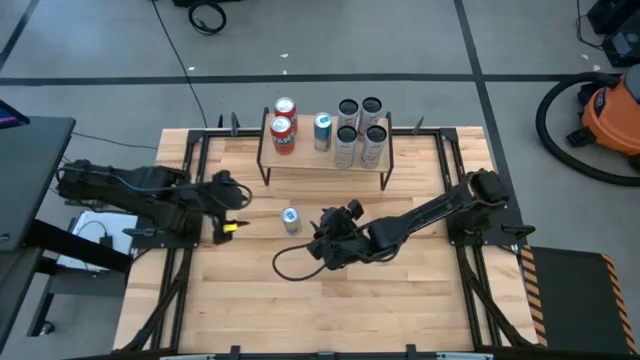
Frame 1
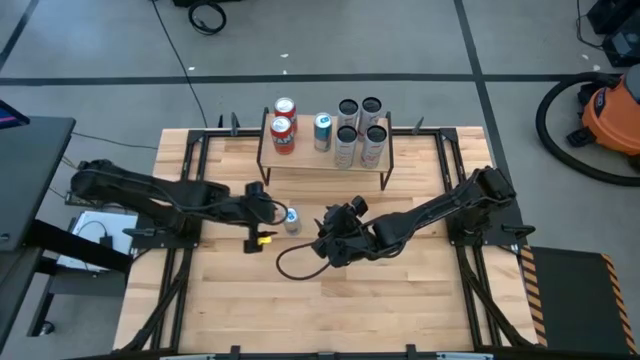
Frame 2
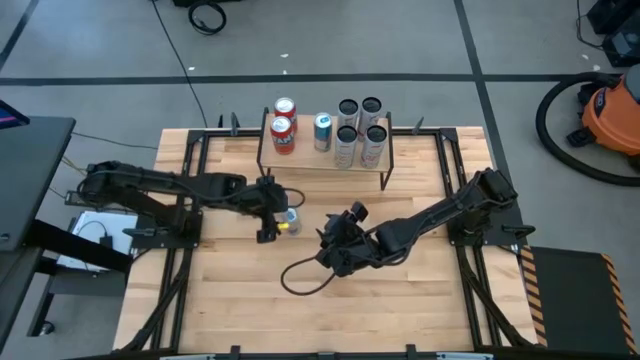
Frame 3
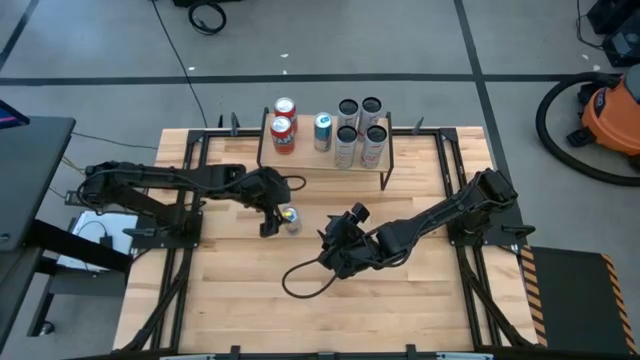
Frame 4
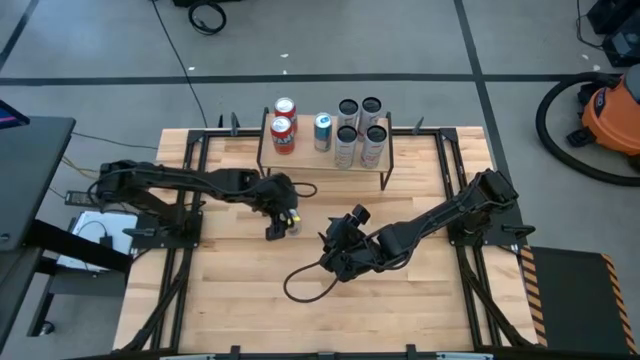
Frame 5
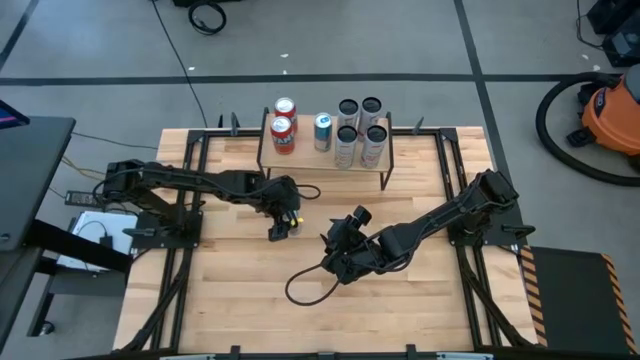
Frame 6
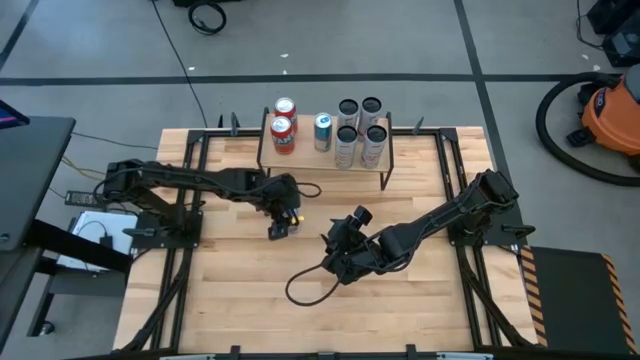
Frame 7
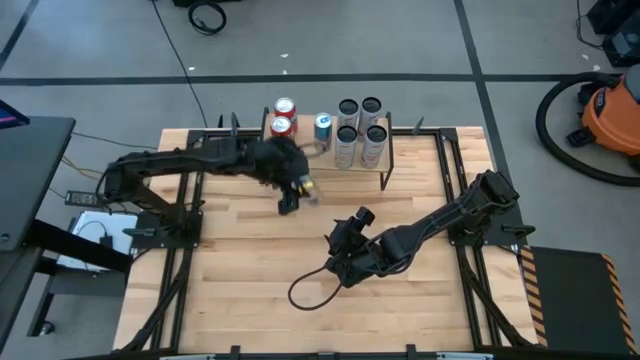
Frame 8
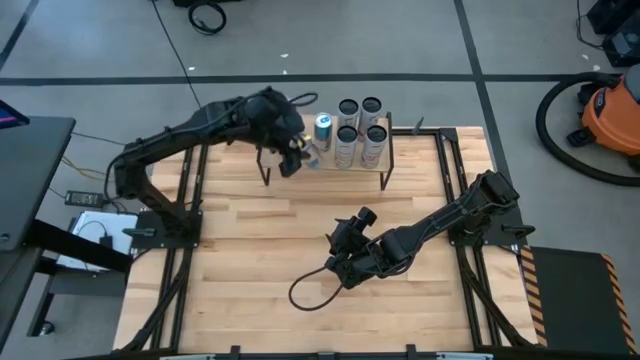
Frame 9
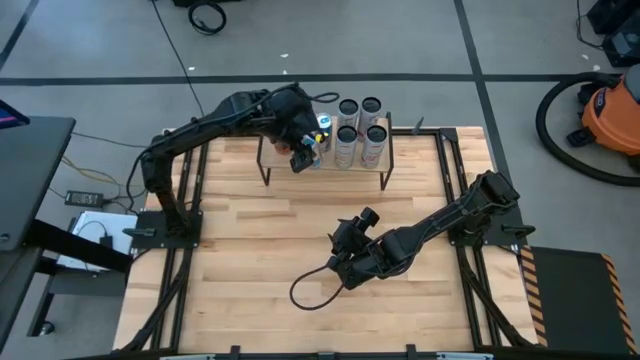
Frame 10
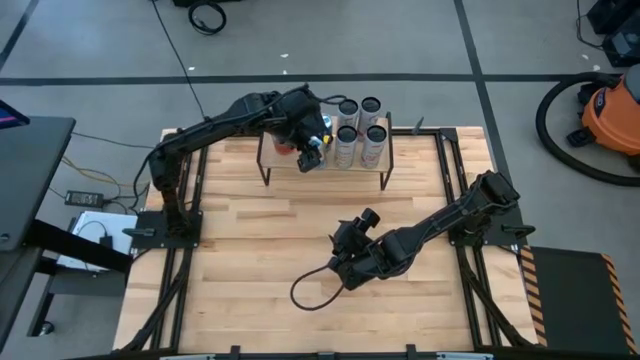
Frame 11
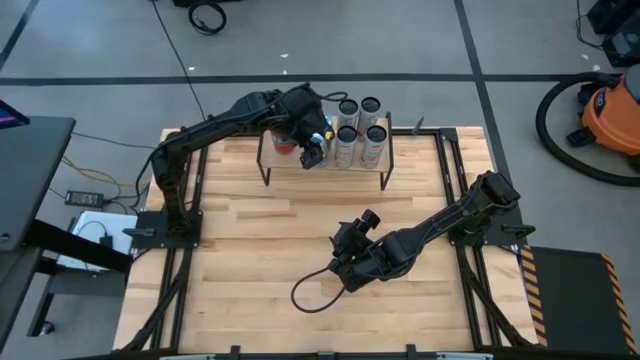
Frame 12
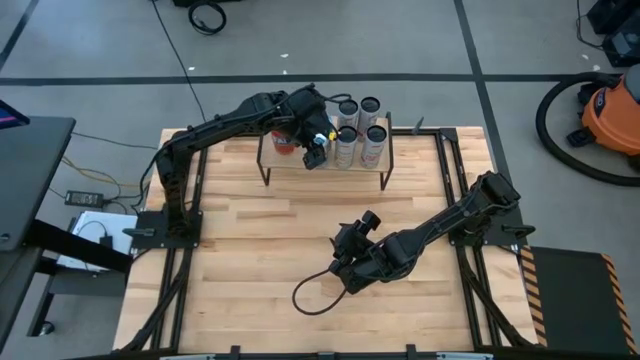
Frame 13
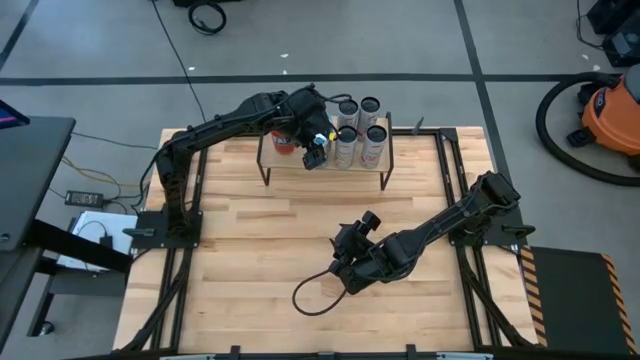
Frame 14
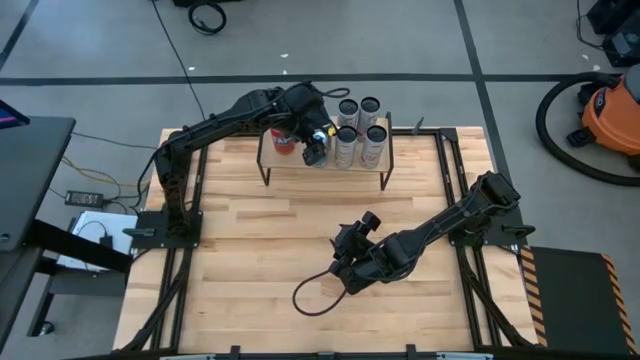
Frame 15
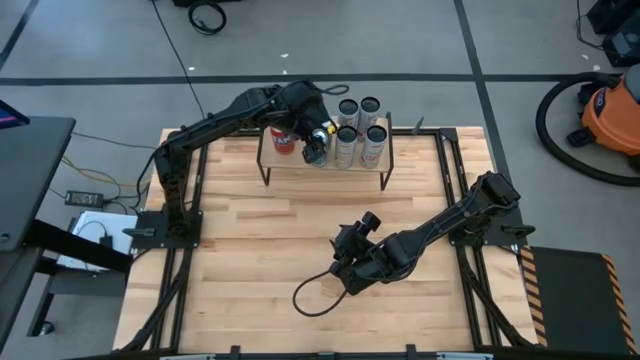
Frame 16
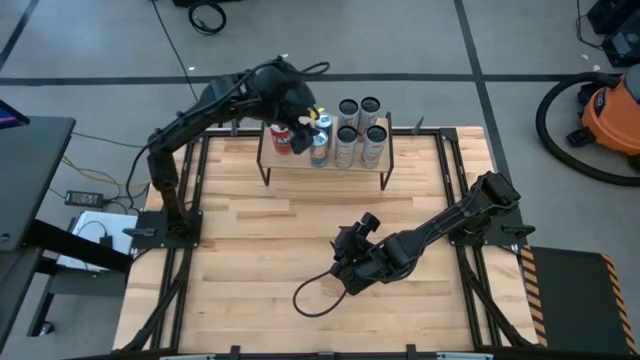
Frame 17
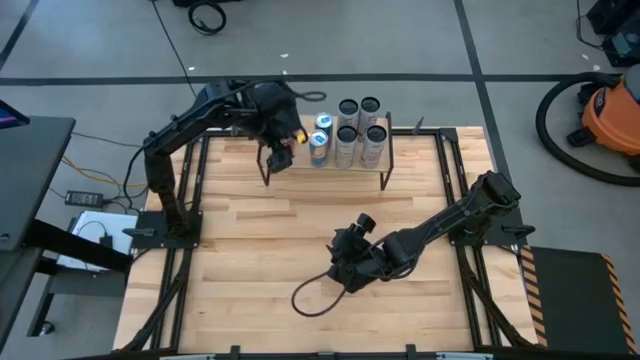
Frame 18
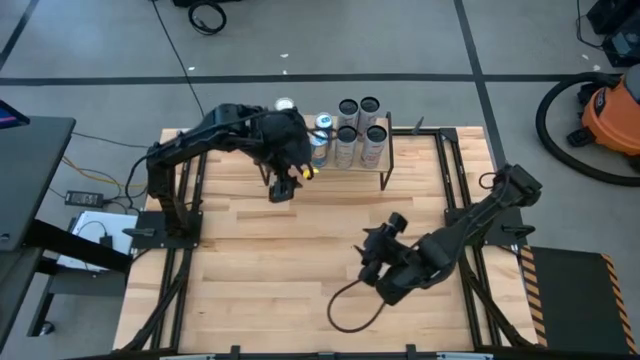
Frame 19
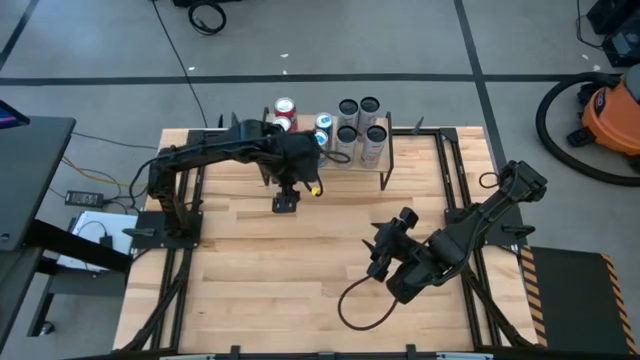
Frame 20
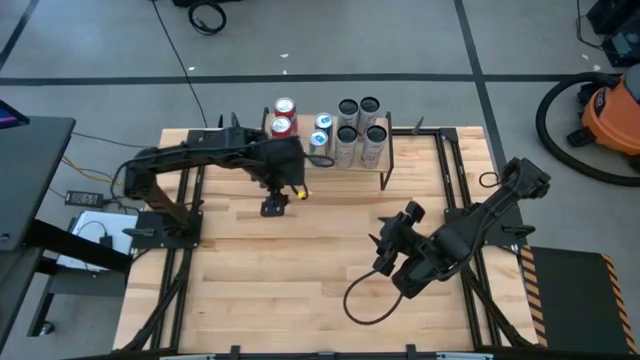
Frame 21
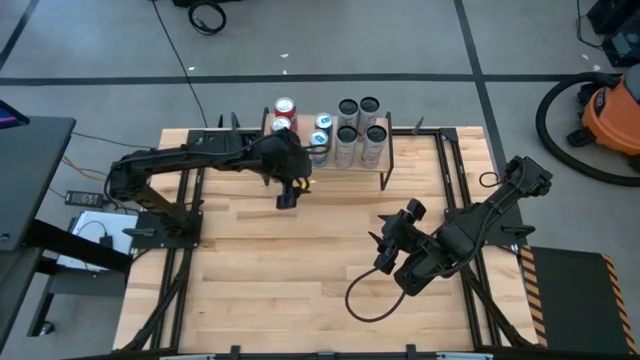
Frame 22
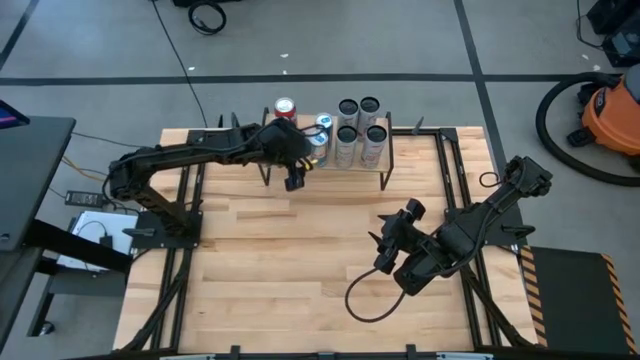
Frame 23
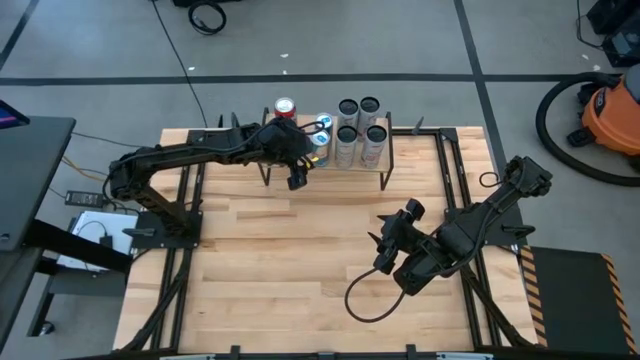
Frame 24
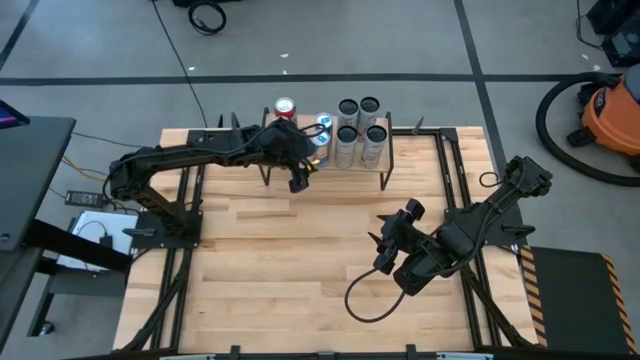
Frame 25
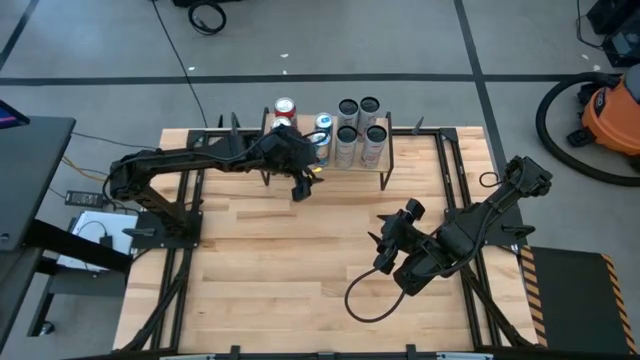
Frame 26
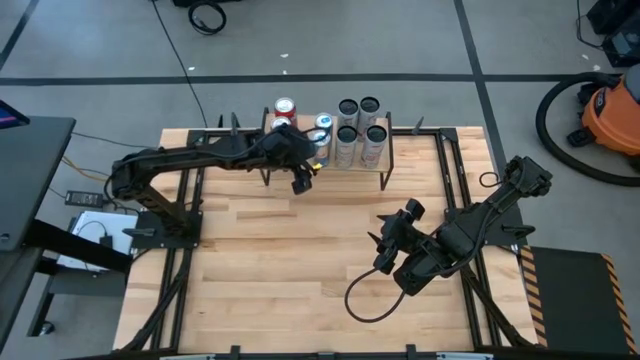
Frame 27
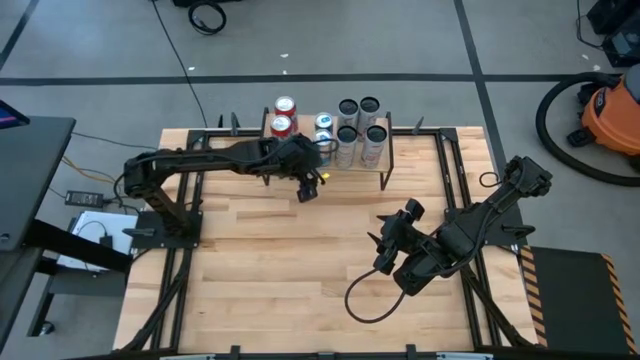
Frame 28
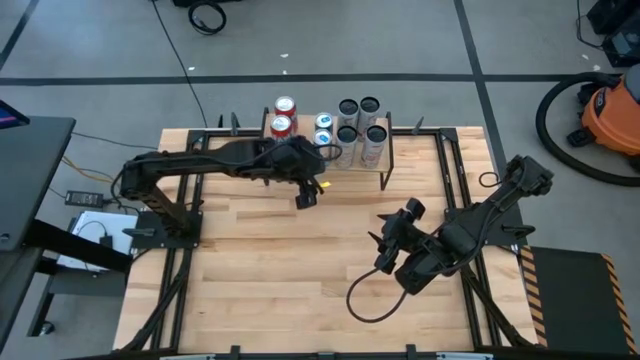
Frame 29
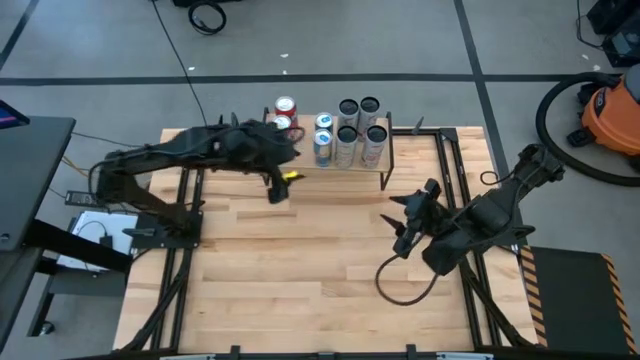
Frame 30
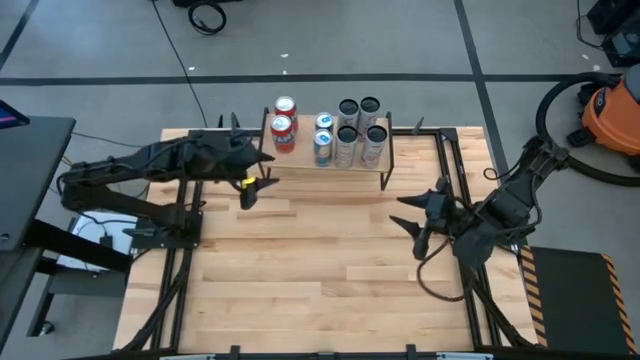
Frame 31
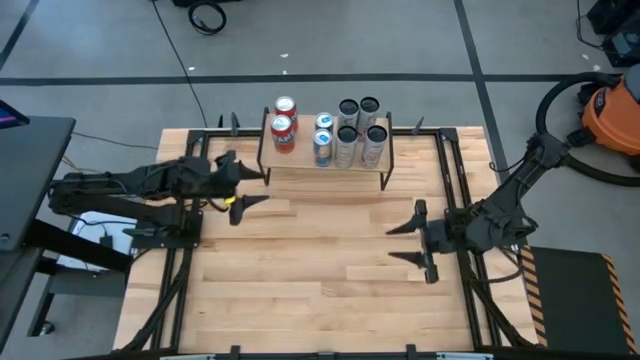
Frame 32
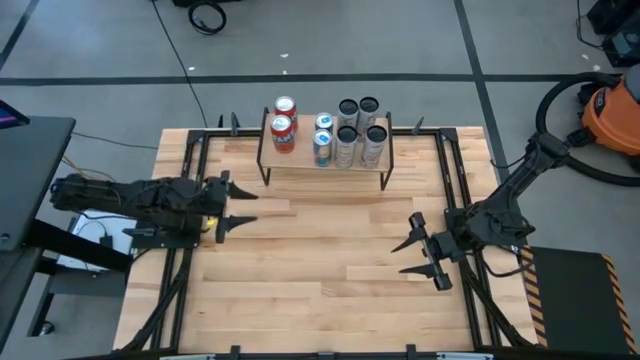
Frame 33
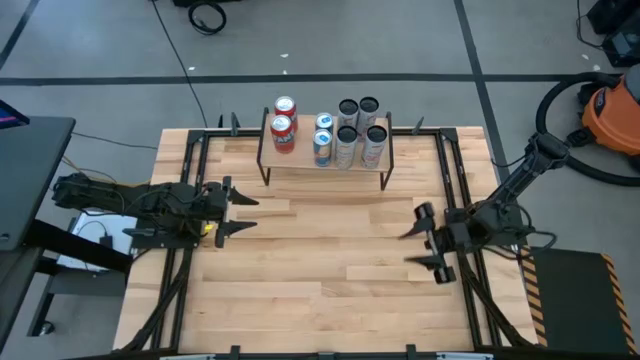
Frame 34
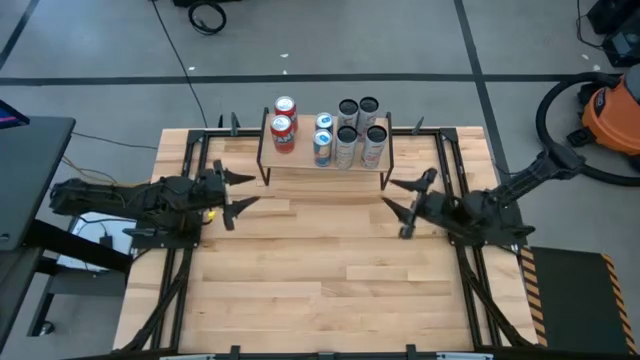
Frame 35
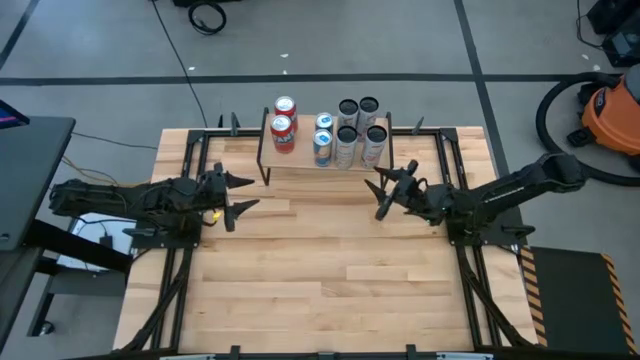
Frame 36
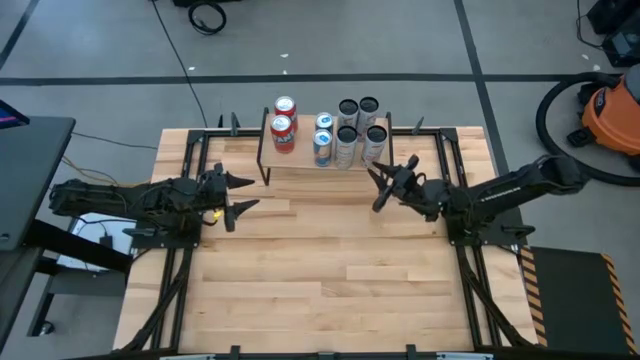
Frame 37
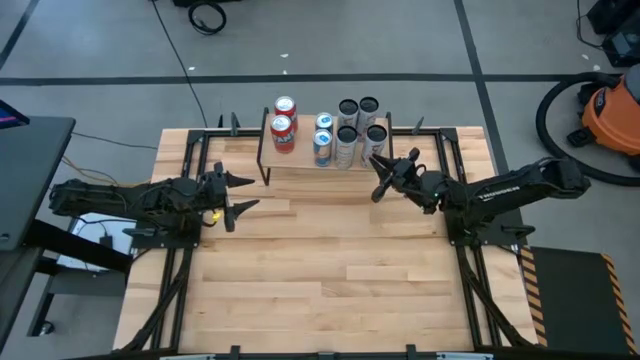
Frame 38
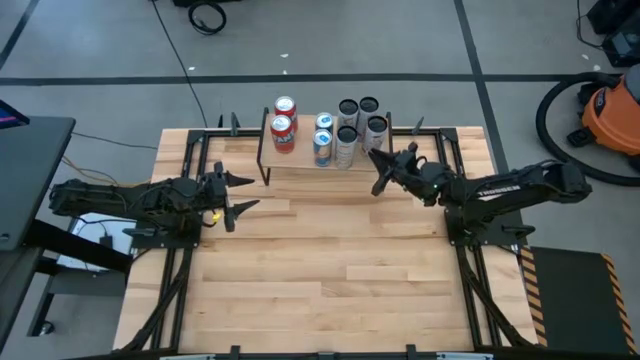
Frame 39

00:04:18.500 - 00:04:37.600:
Task: Place canned beverage on shelf
Put the blue soda can on the shelf aligned with the other blue soda can
